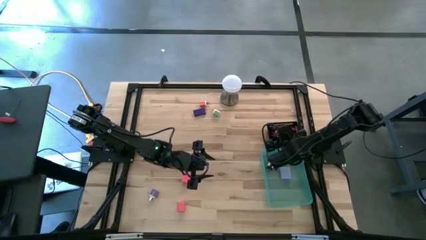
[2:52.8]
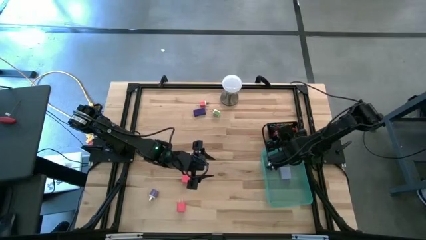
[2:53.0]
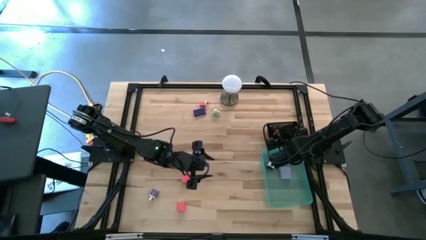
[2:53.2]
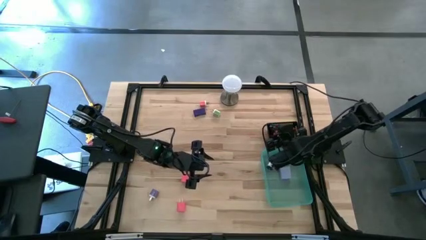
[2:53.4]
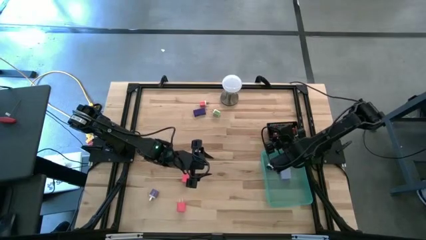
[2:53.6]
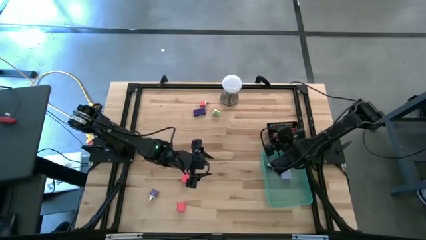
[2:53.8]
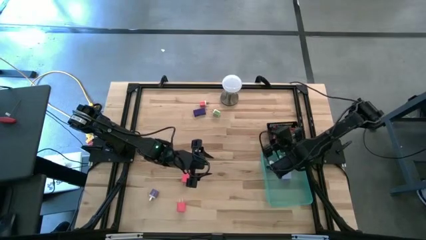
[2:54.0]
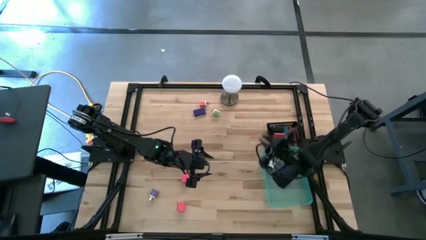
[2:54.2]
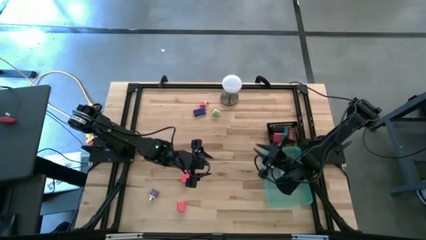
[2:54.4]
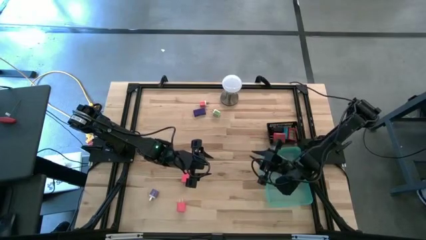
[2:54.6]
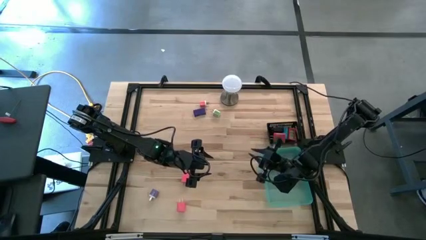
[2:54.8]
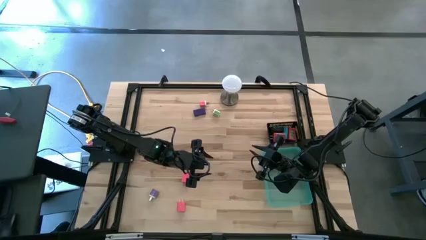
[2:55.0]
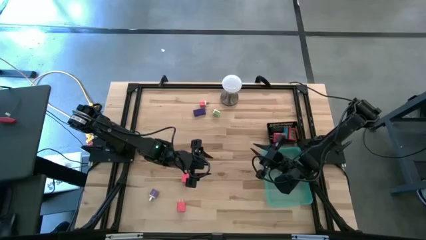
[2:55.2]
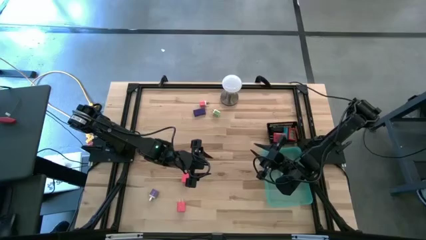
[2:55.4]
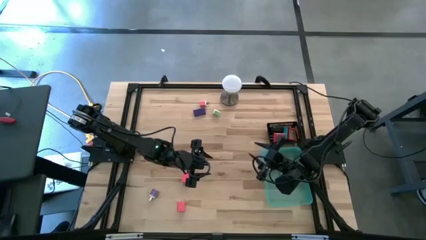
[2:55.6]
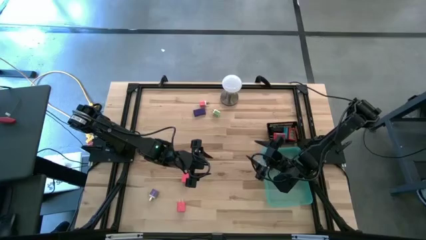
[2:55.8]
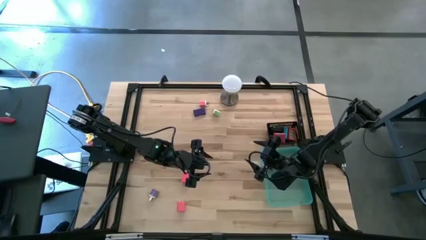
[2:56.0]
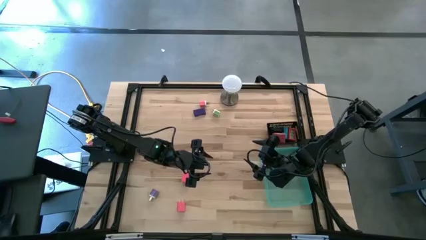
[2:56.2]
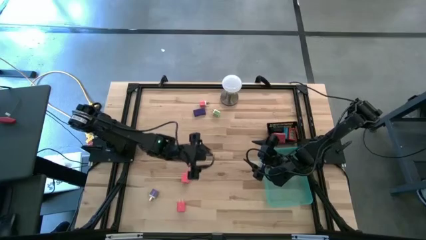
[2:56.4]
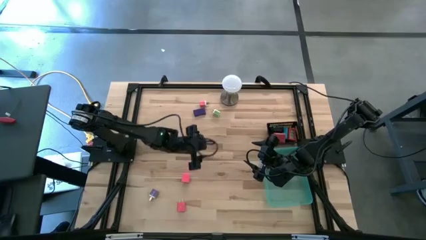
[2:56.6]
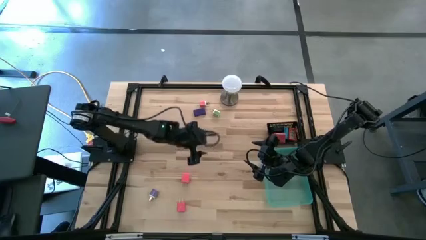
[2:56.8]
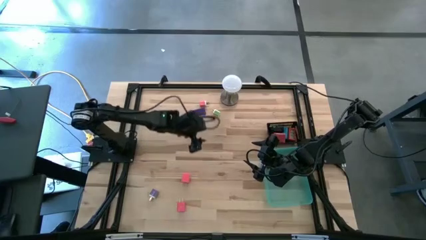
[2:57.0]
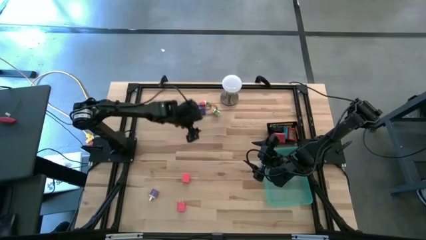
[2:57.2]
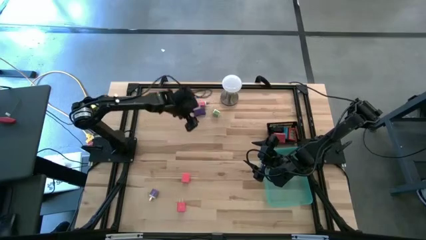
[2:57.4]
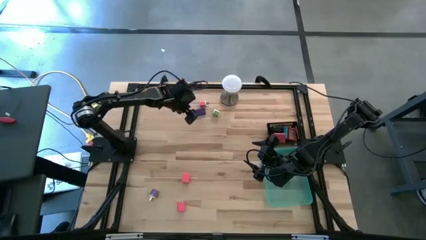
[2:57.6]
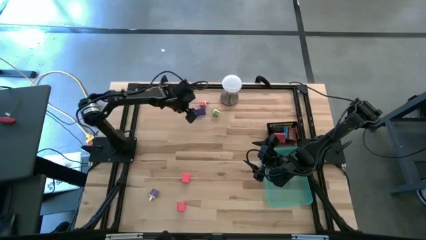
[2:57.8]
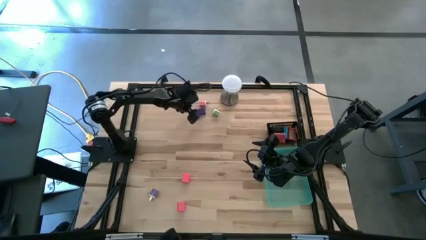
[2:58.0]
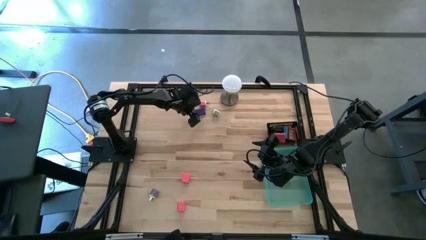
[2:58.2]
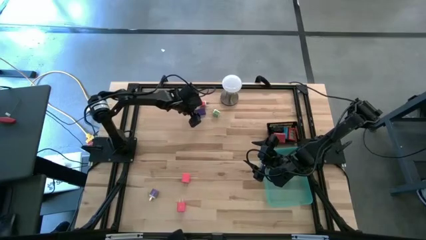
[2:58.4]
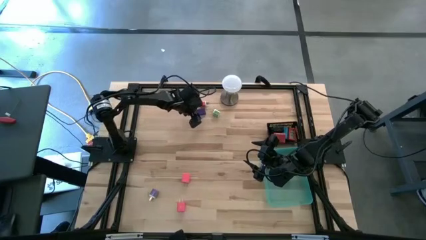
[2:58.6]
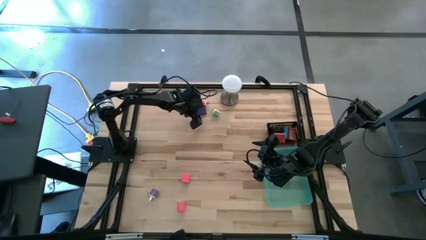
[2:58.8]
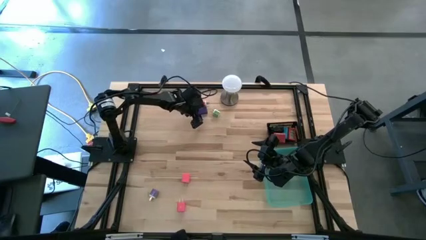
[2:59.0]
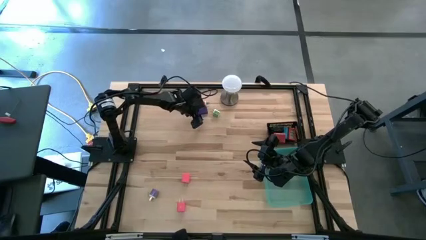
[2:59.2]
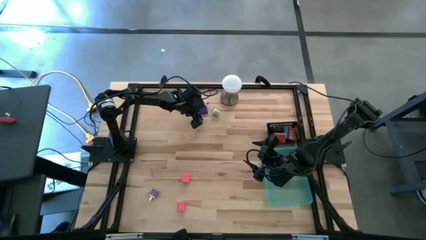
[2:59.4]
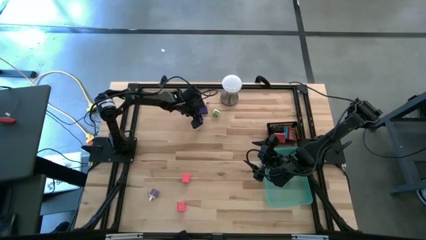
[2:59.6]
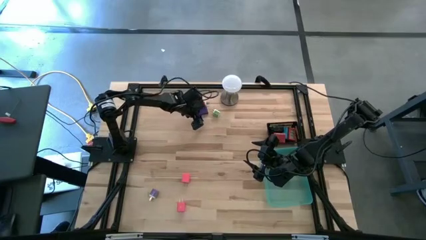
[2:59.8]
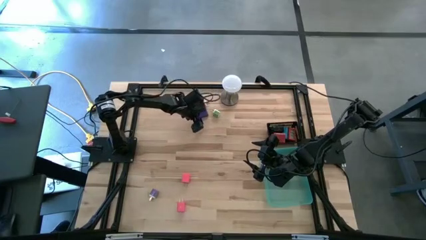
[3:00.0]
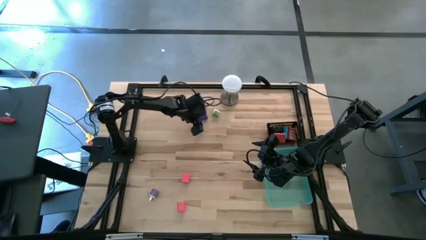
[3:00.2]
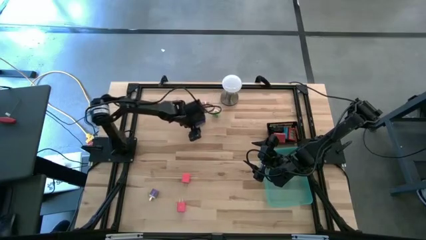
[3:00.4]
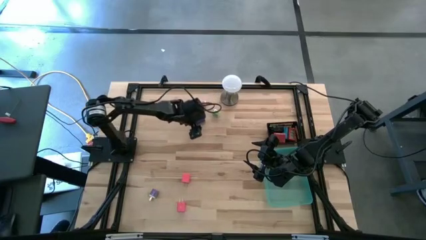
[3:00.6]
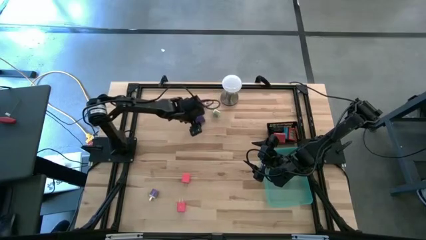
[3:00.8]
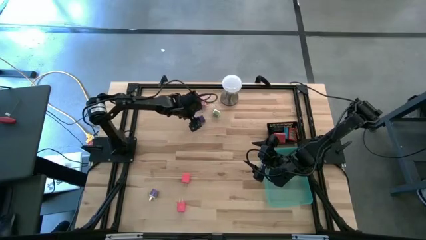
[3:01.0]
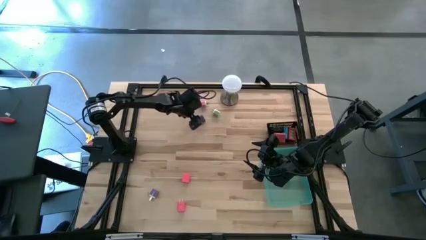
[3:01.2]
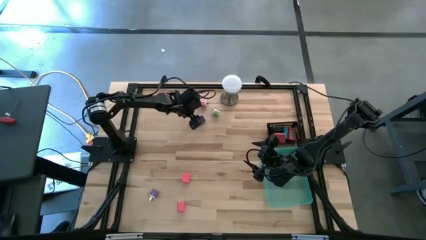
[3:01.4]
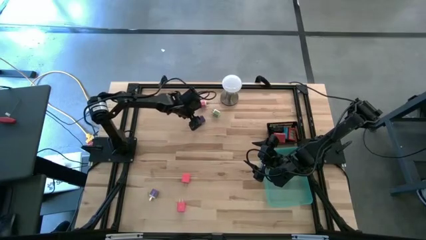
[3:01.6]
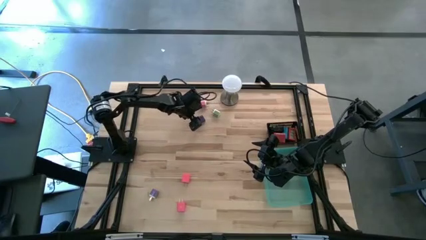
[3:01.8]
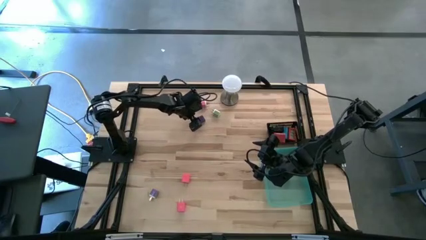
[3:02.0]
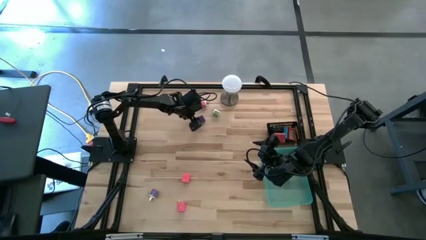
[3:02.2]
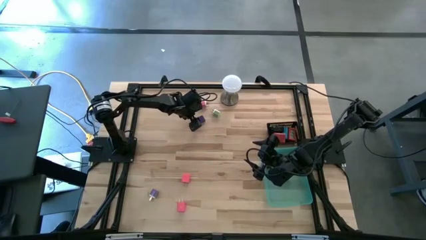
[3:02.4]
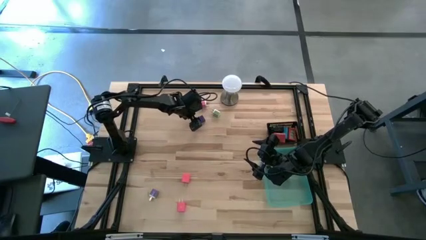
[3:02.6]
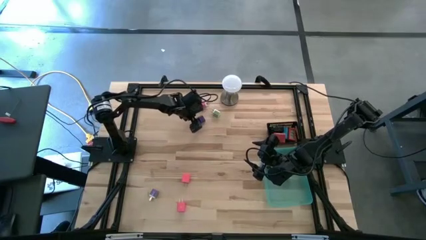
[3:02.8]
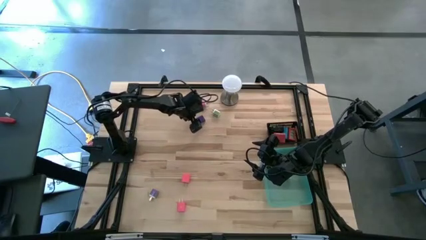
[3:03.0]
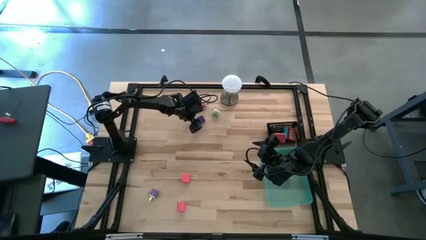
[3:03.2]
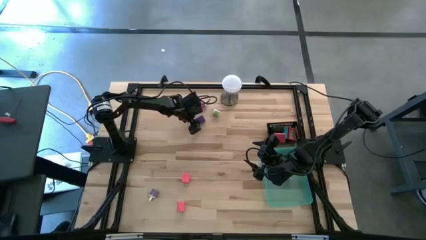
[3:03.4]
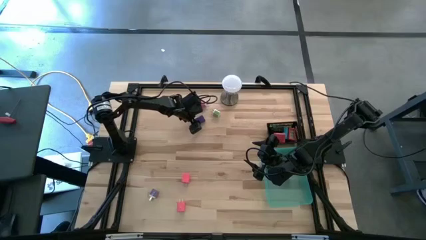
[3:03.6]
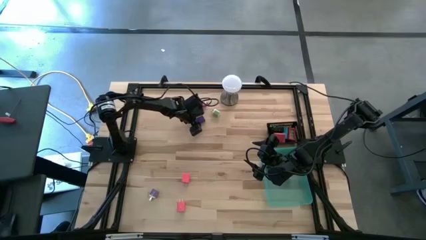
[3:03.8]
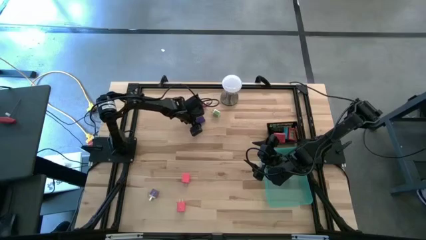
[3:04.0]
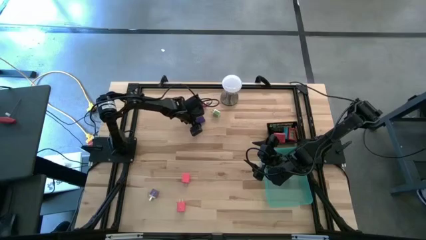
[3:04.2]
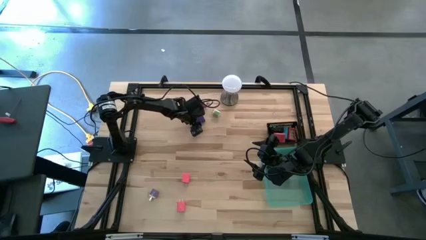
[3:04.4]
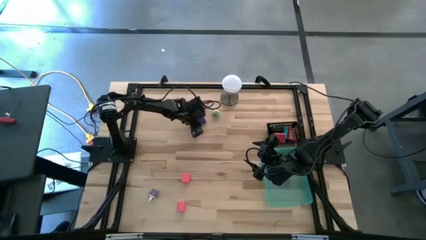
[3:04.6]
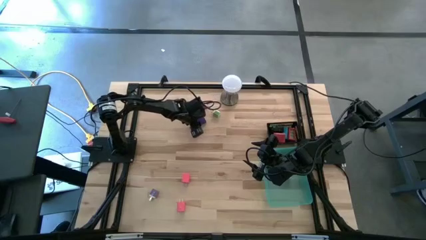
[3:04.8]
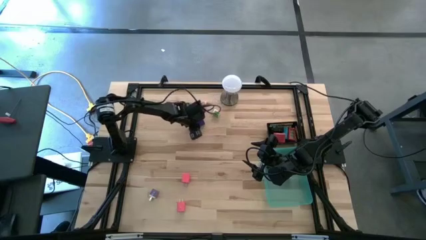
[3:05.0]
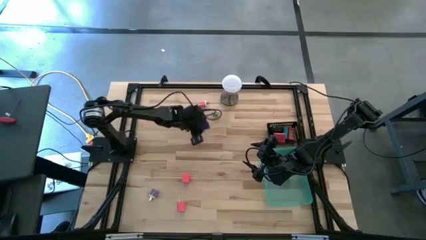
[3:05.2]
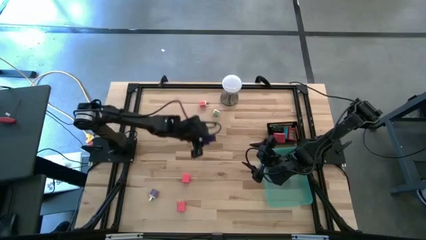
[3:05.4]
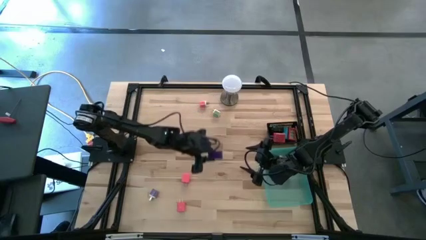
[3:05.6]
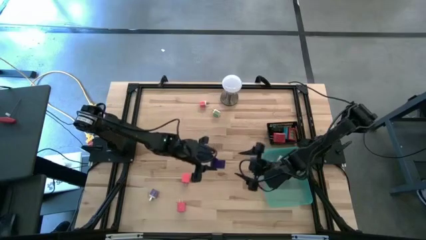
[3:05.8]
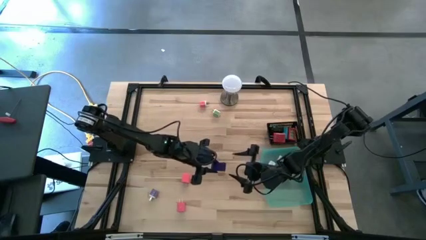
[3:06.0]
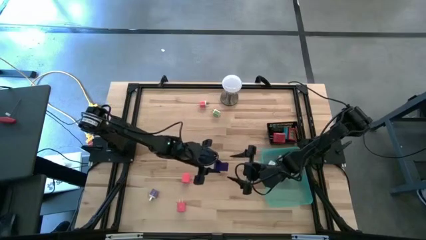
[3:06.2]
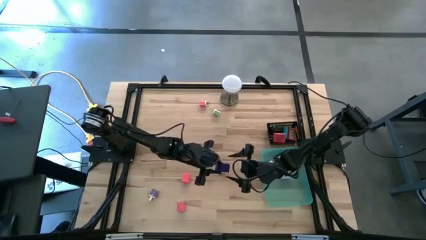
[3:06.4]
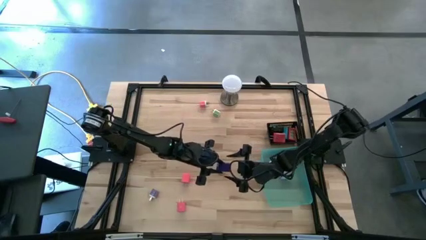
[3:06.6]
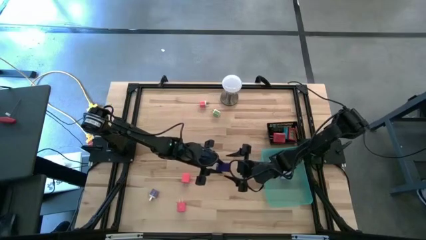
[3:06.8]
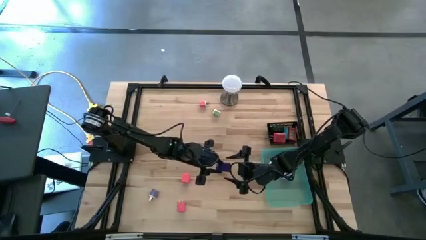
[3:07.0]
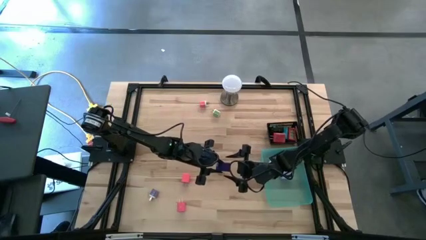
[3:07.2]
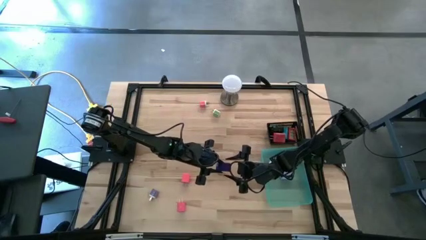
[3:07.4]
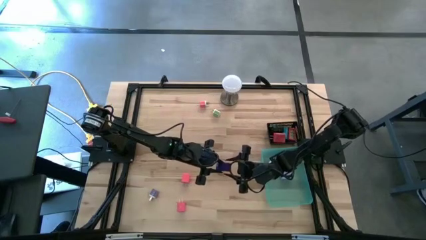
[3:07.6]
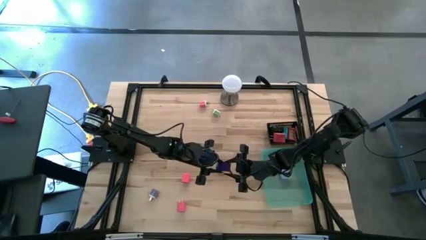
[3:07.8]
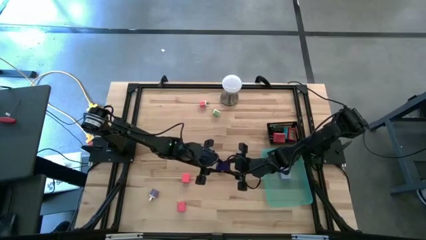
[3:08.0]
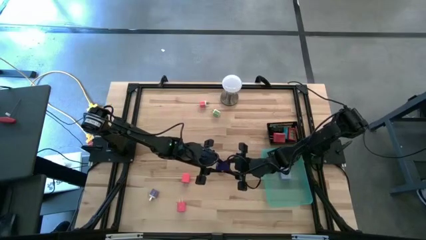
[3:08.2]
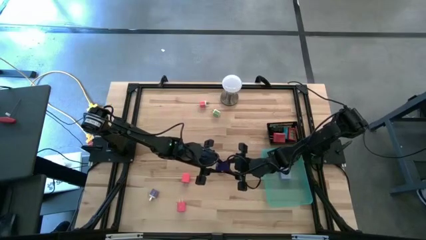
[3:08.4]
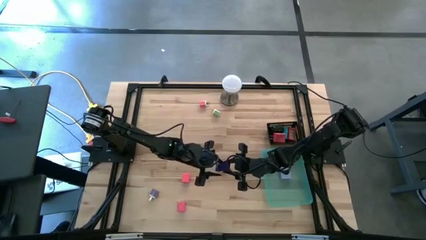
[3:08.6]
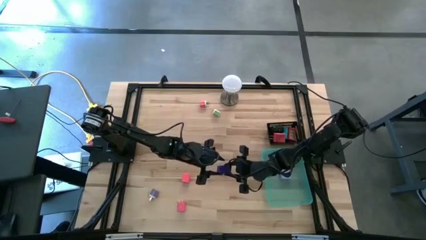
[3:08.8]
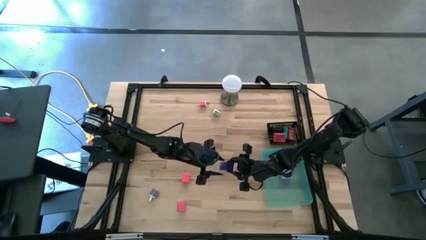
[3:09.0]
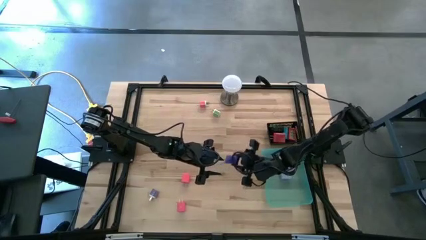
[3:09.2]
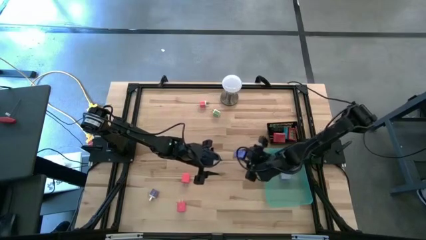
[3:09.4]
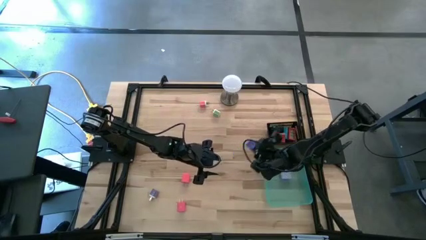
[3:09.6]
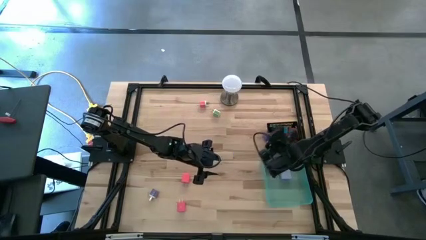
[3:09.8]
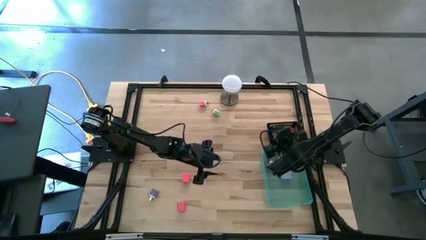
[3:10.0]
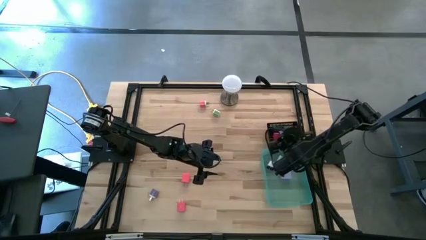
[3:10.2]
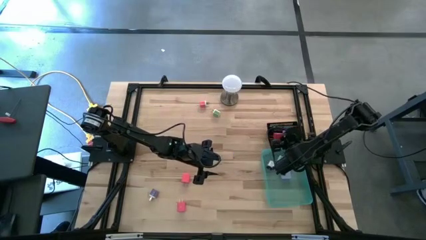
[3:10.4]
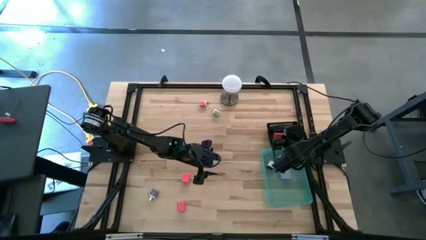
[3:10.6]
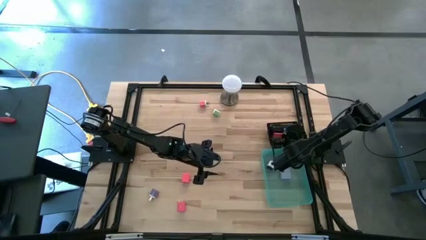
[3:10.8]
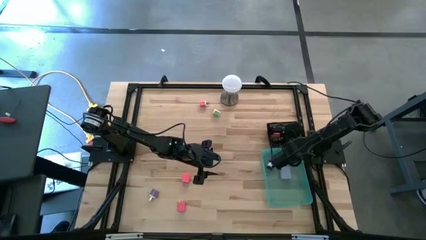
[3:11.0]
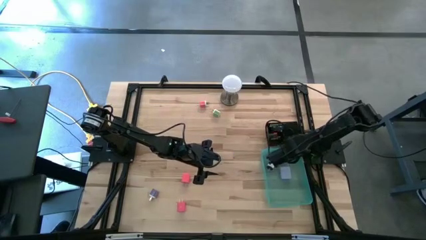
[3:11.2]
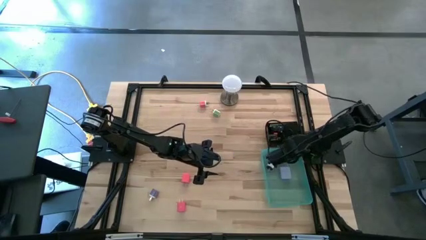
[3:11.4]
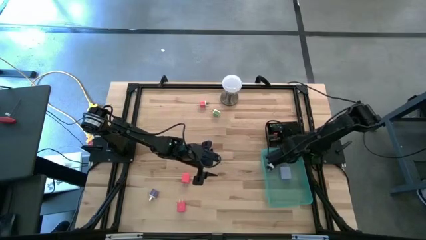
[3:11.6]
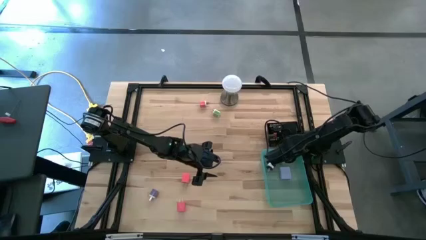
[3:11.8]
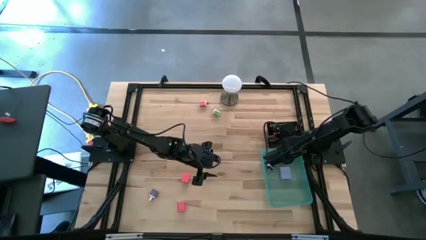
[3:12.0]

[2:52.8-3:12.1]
Task: Pick & Place Office items
Put the violet digital clock into the black basket
